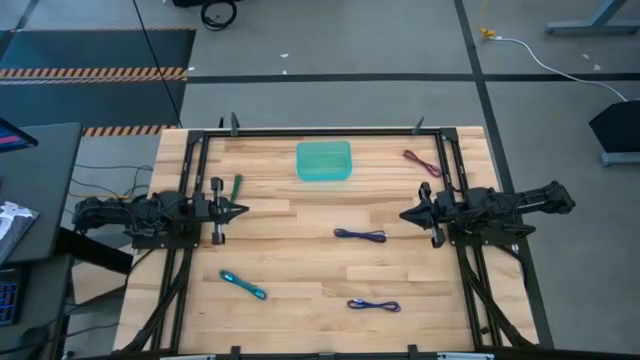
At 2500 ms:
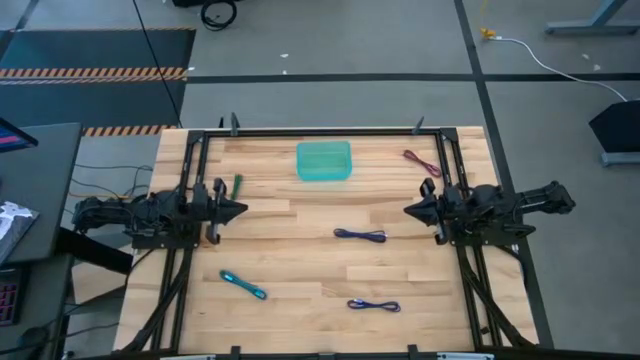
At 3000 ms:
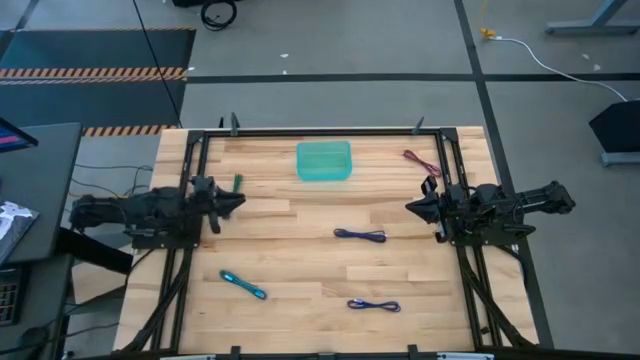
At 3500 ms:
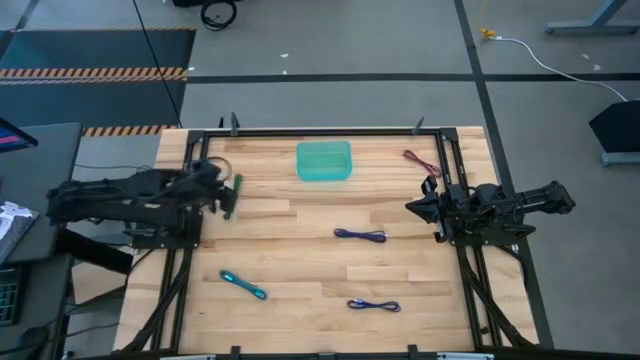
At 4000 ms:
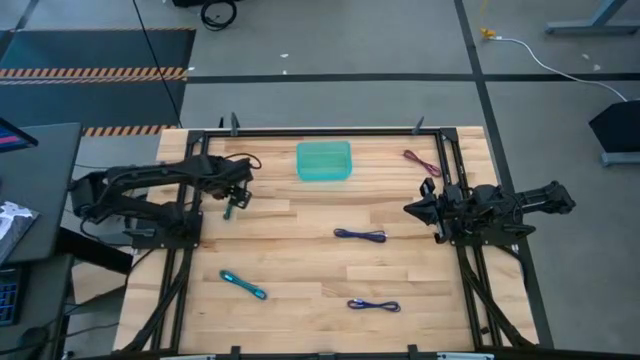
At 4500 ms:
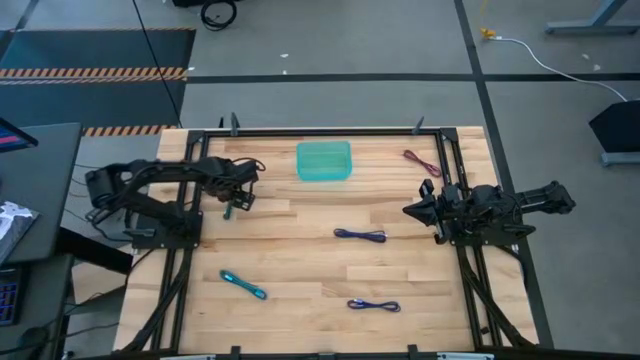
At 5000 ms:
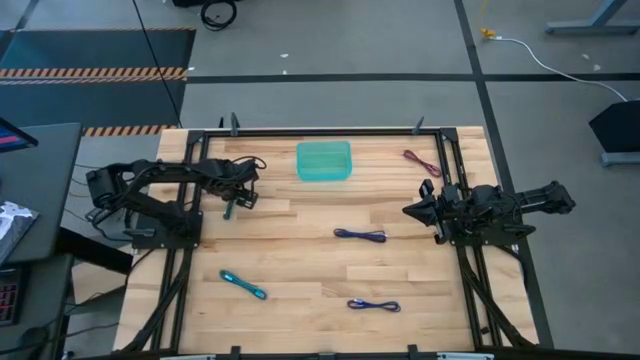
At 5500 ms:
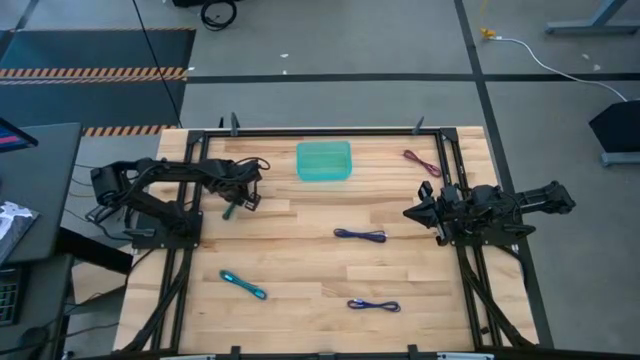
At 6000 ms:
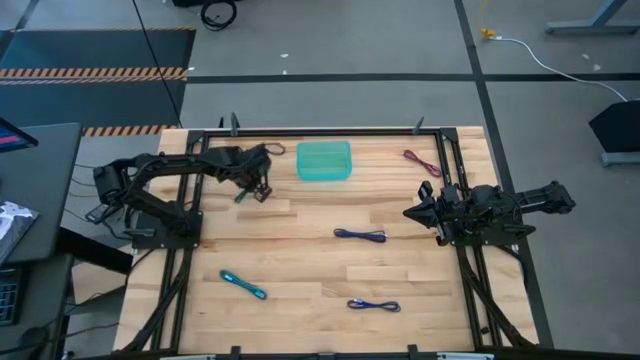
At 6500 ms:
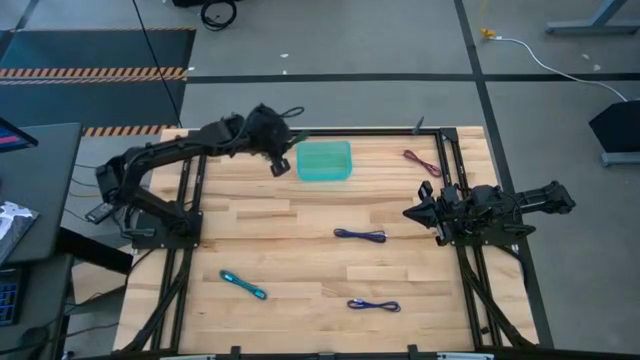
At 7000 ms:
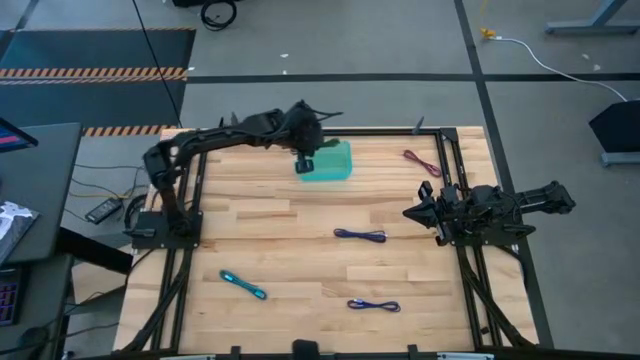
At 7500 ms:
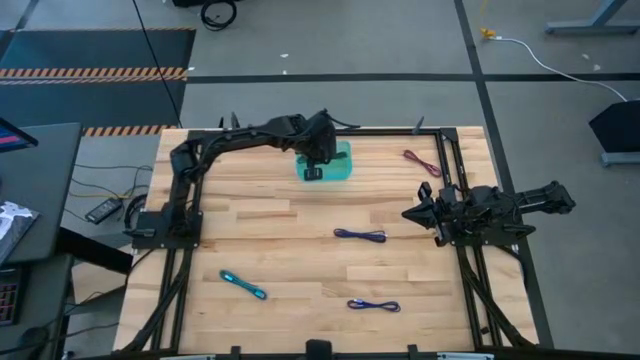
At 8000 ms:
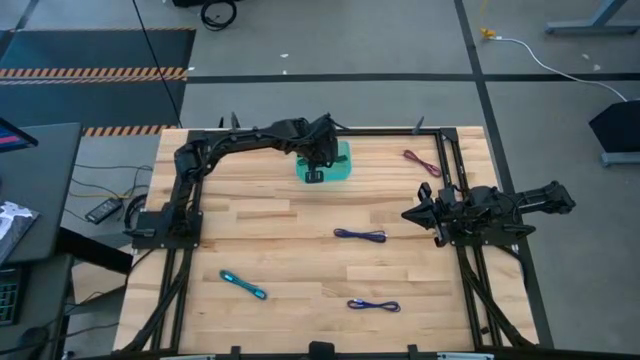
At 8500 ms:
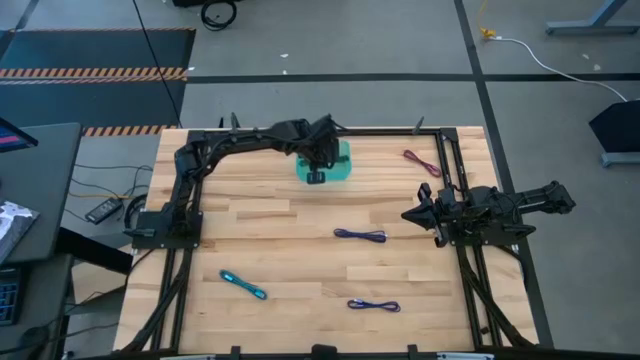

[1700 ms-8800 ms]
Task: Pick and place USB-C Cables
Put the green charger cable into the green bin

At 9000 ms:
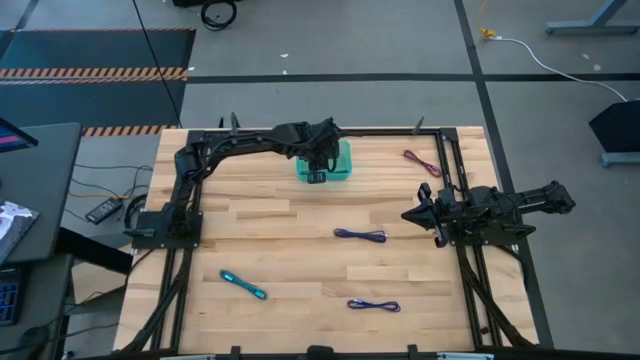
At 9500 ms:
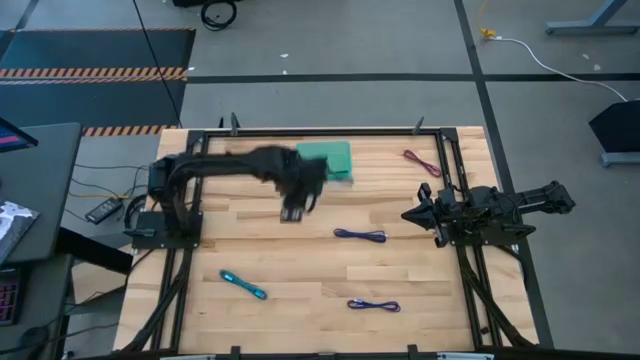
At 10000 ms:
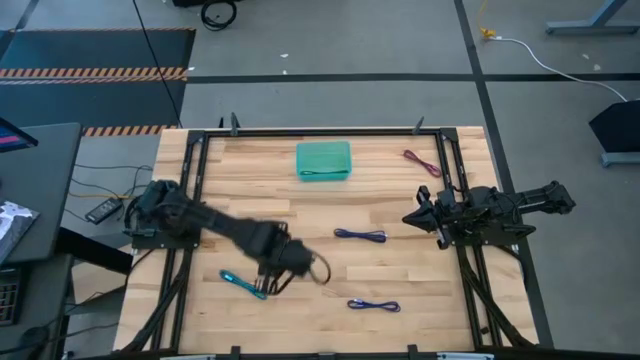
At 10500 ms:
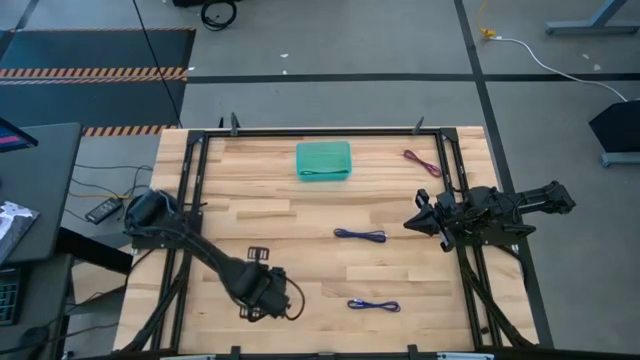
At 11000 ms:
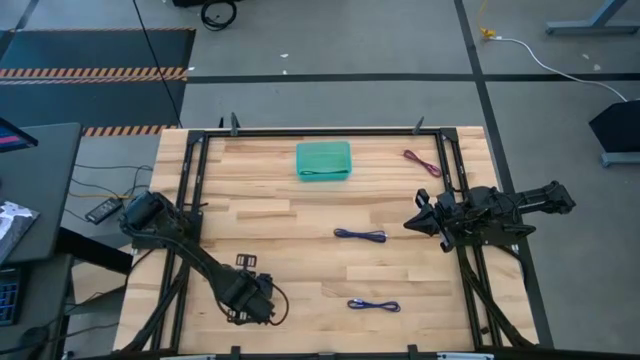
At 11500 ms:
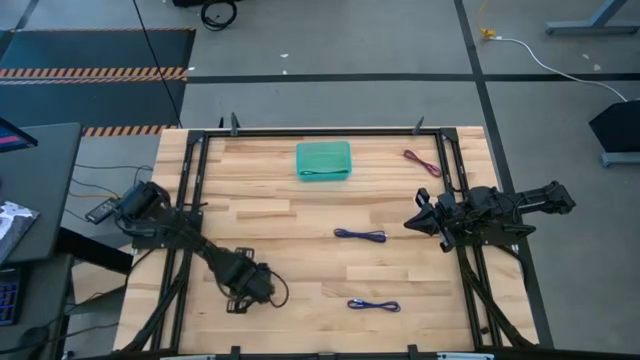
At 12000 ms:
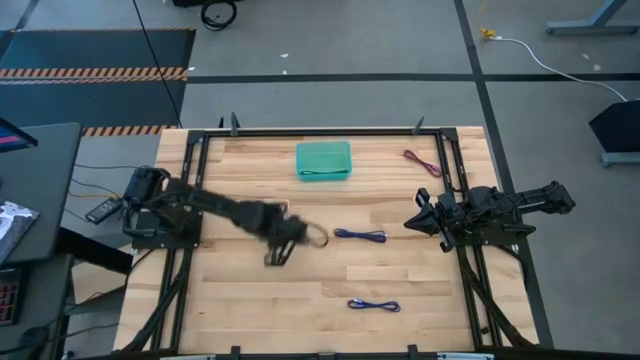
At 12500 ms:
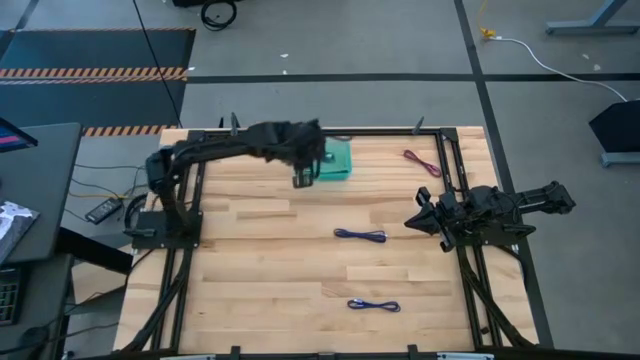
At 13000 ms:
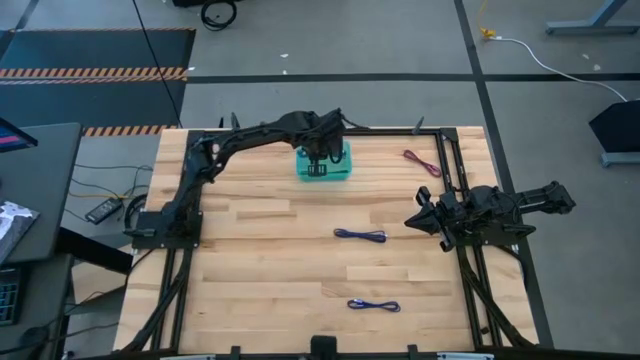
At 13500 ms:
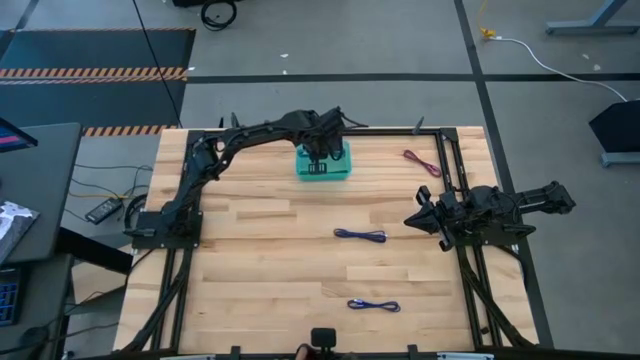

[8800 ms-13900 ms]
Put the light blue charger cable into the green bin

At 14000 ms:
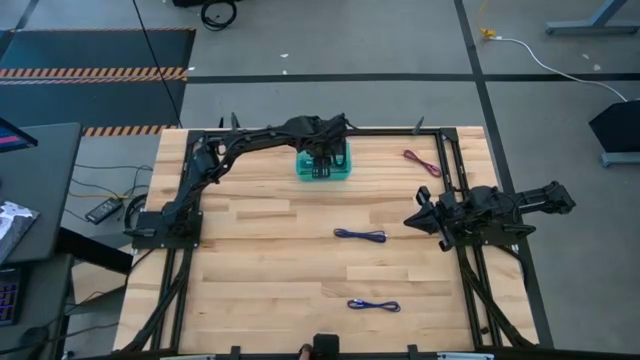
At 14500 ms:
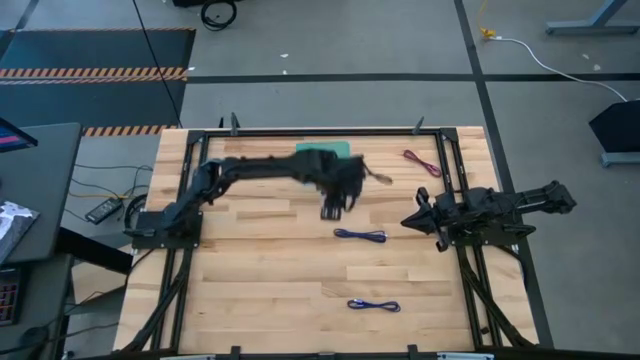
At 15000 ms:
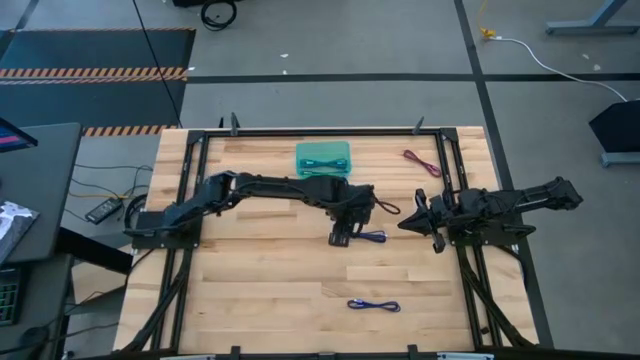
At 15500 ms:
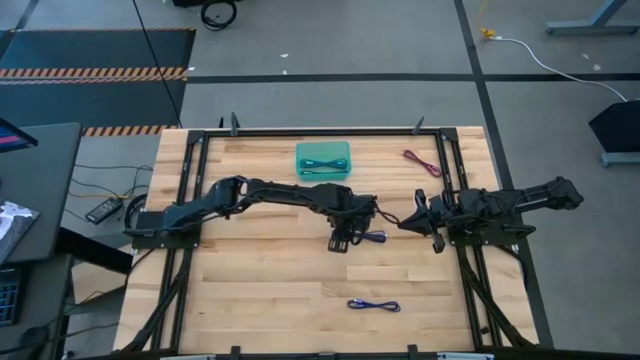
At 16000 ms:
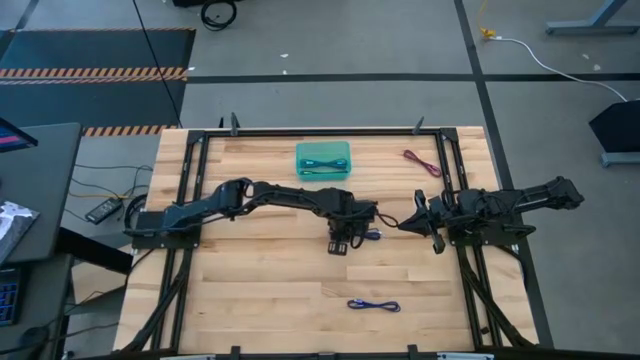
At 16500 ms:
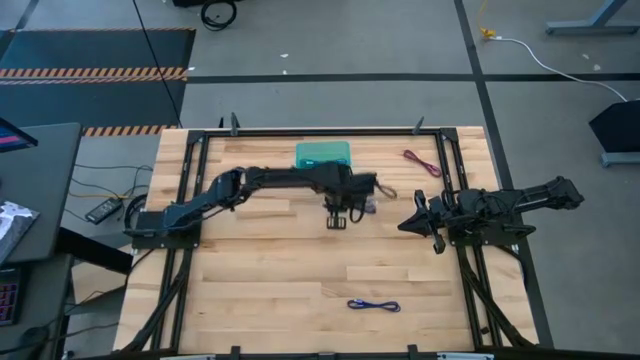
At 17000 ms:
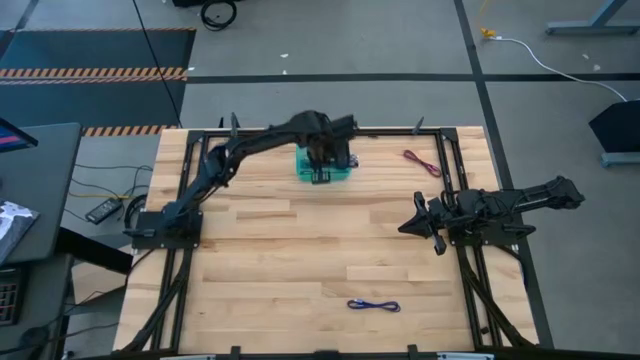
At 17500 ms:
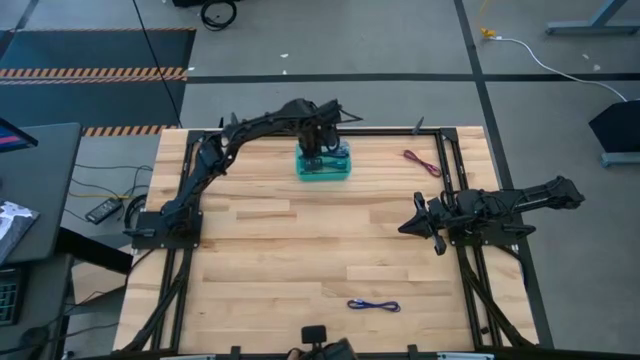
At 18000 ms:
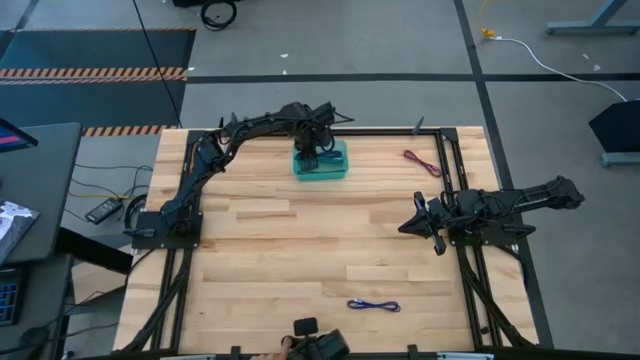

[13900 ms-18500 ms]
Put the top purple charger cable into the green bin

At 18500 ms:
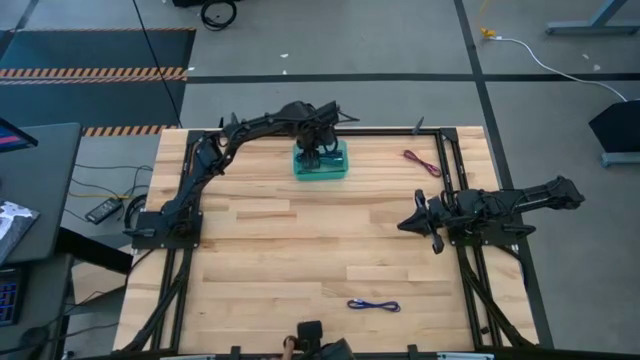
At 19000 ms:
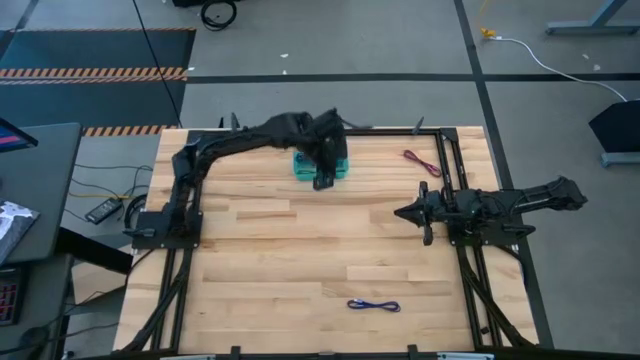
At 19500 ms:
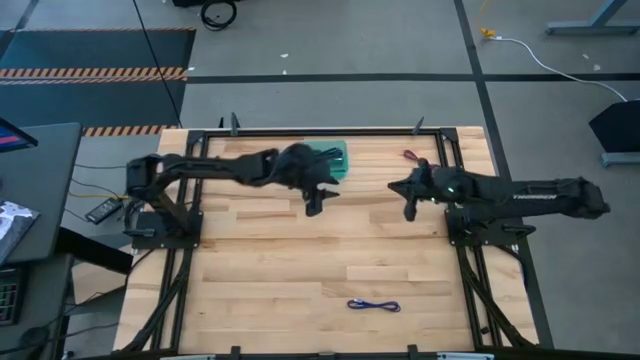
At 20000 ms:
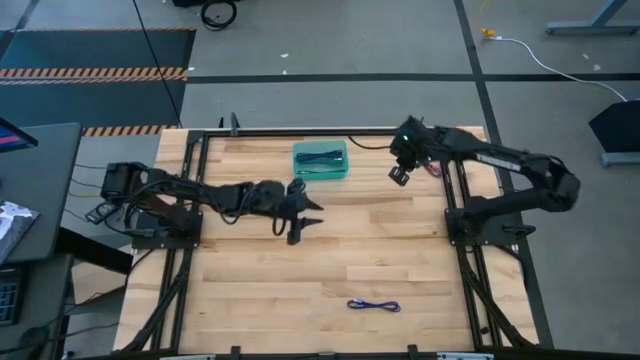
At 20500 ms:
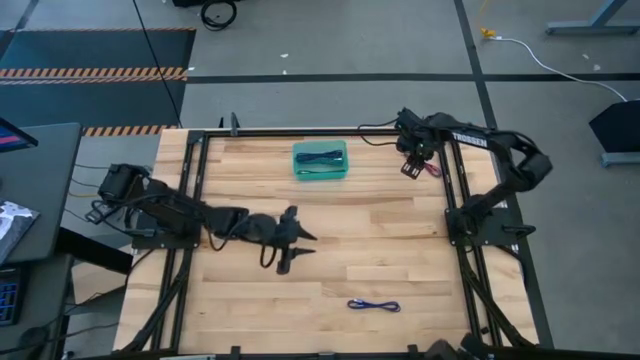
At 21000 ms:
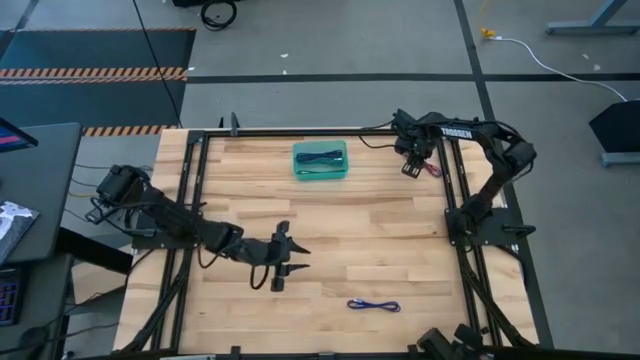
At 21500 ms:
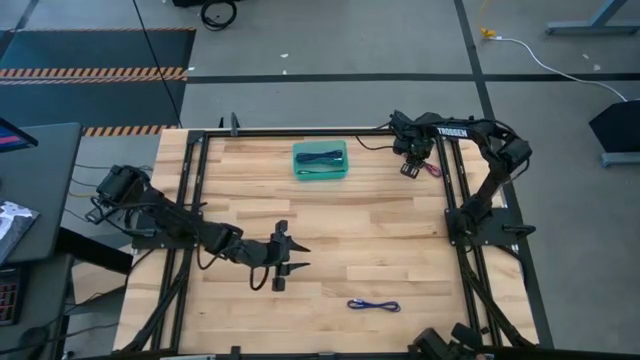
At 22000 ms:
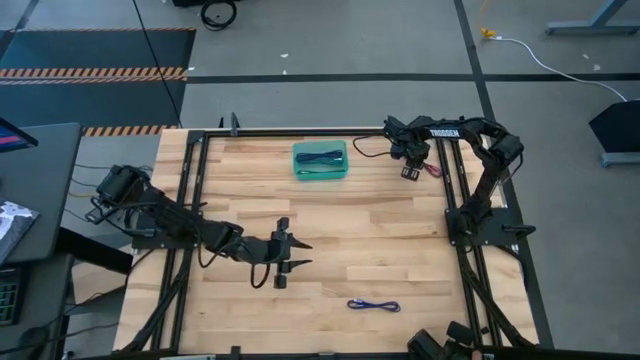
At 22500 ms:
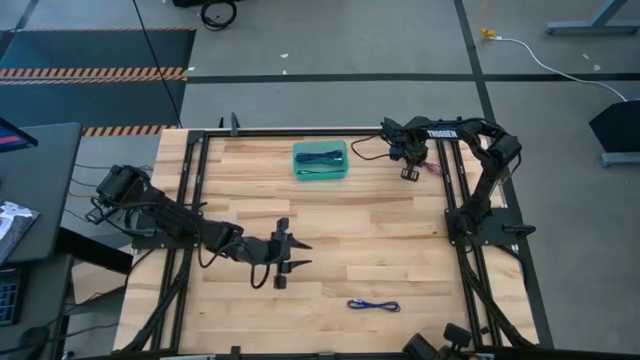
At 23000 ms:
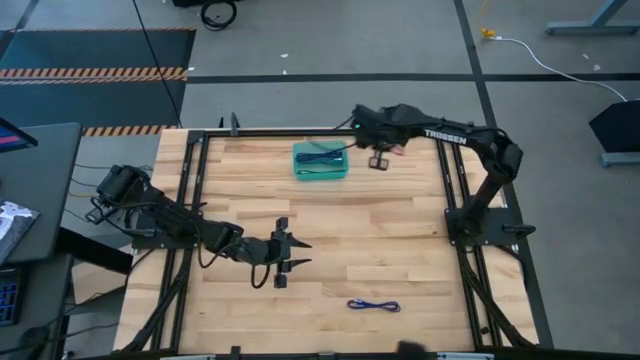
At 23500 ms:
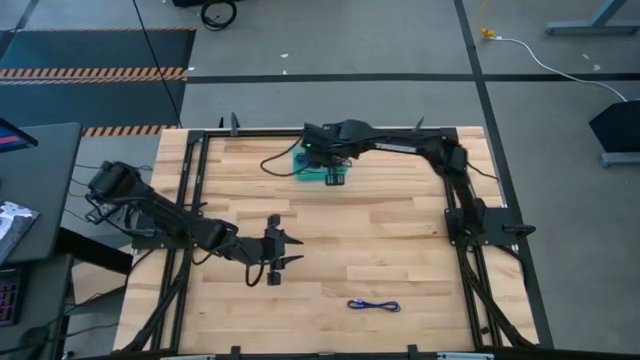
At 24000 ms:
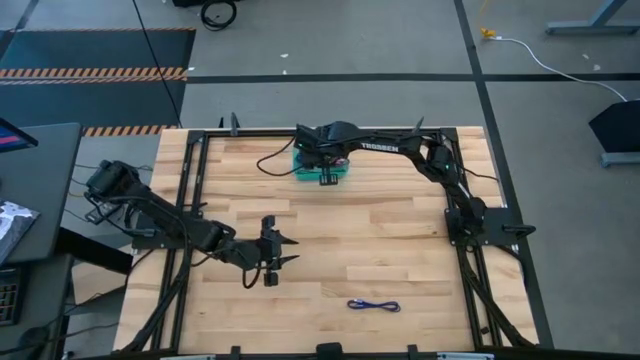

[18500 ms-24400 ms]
Put the pink charger cable into the green bin
